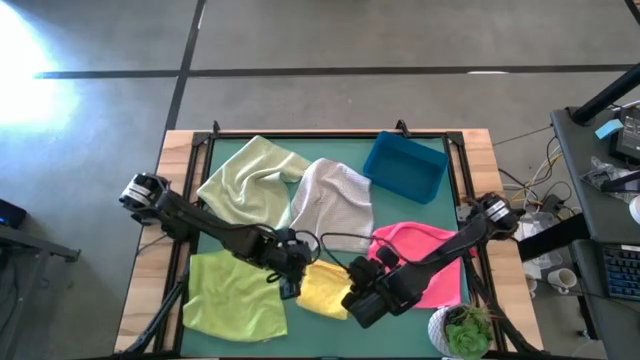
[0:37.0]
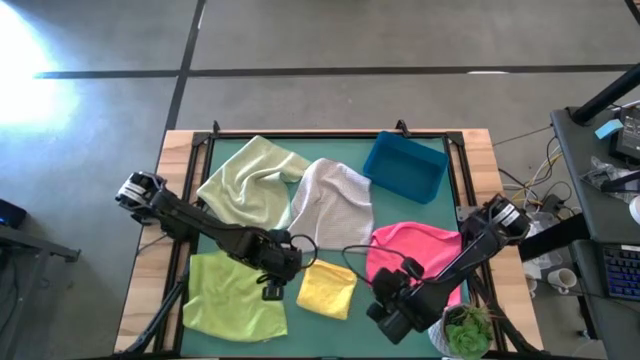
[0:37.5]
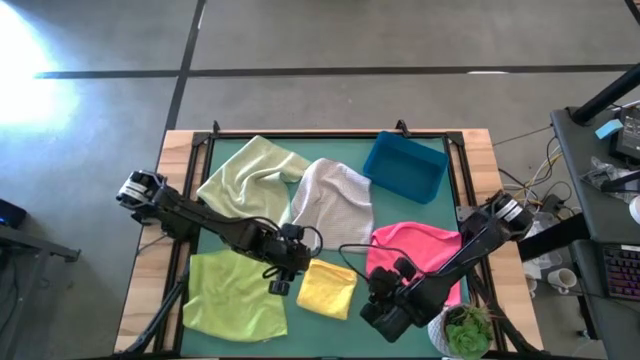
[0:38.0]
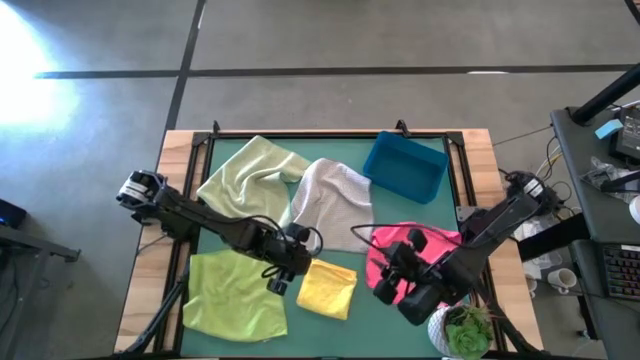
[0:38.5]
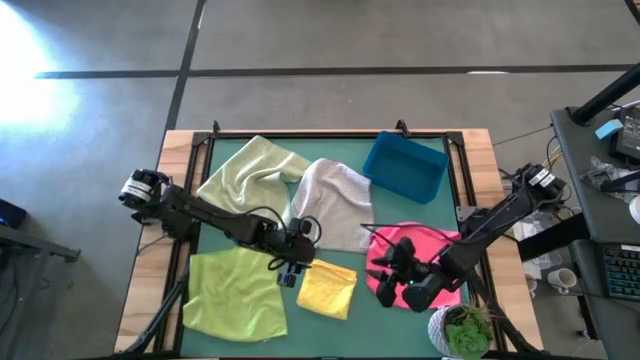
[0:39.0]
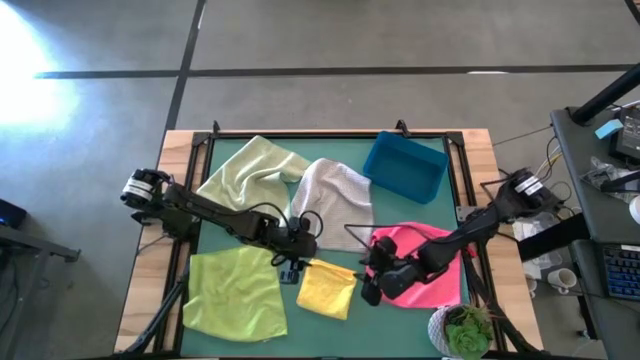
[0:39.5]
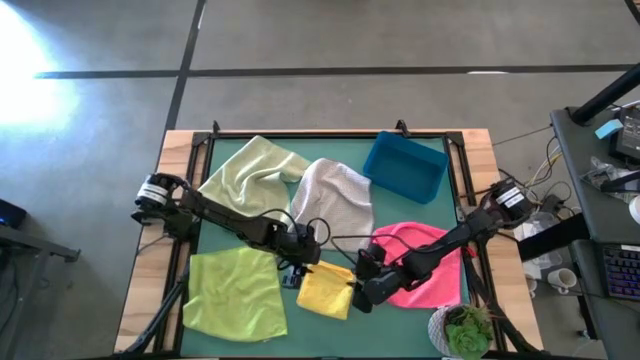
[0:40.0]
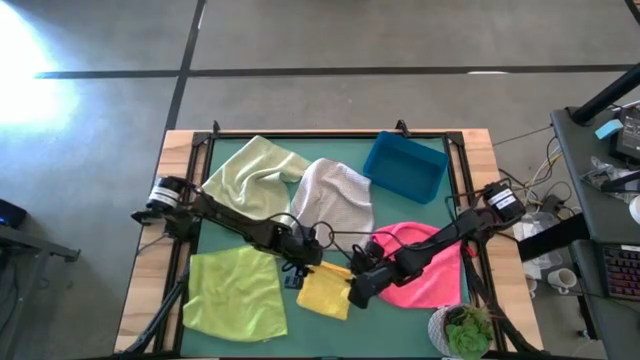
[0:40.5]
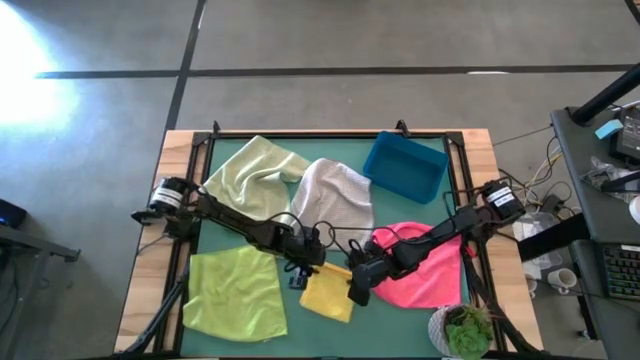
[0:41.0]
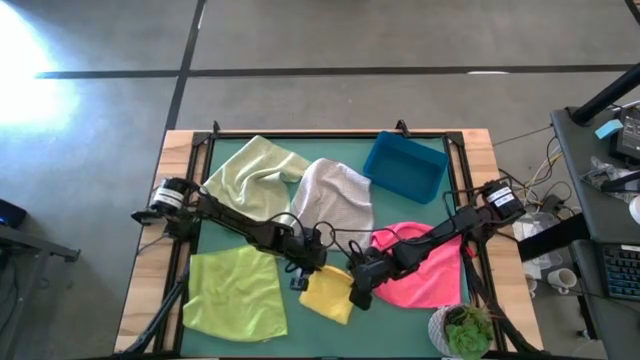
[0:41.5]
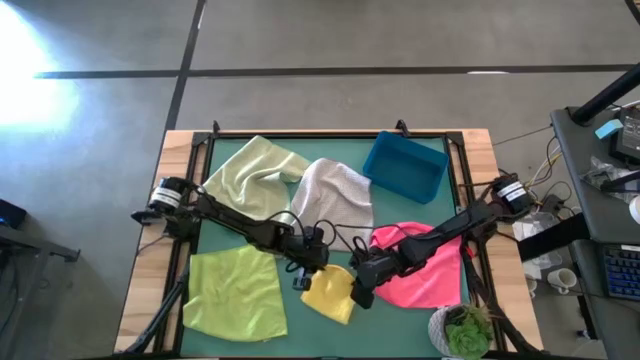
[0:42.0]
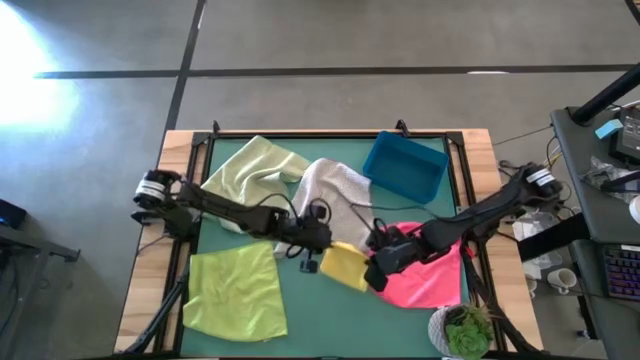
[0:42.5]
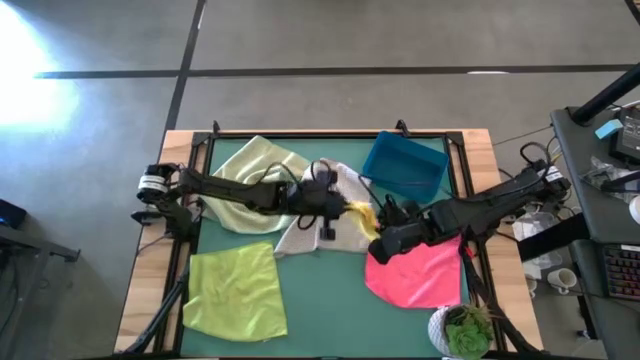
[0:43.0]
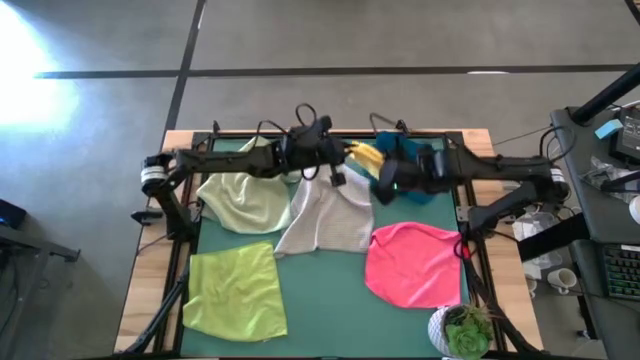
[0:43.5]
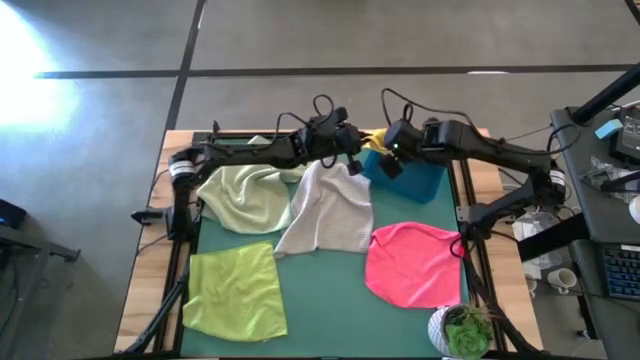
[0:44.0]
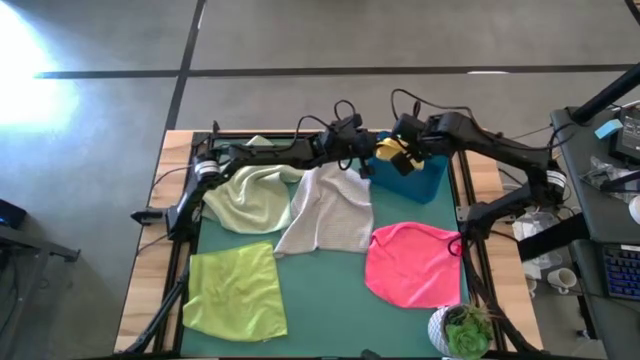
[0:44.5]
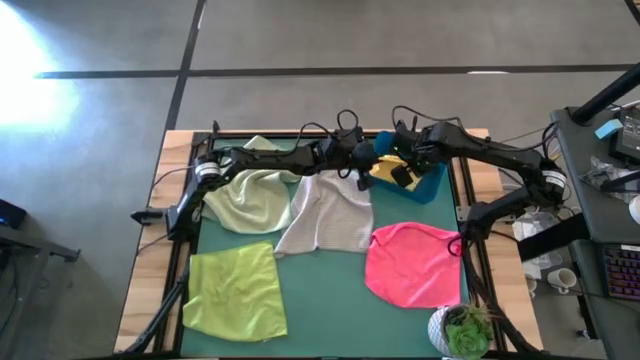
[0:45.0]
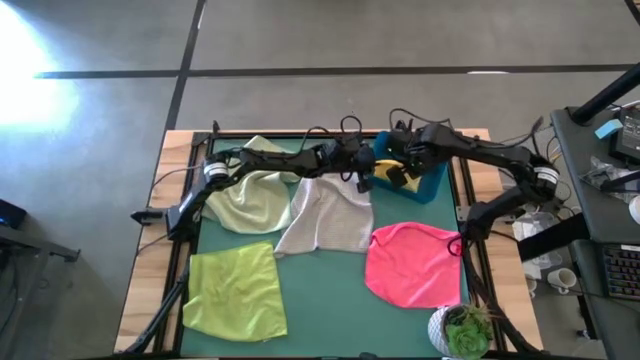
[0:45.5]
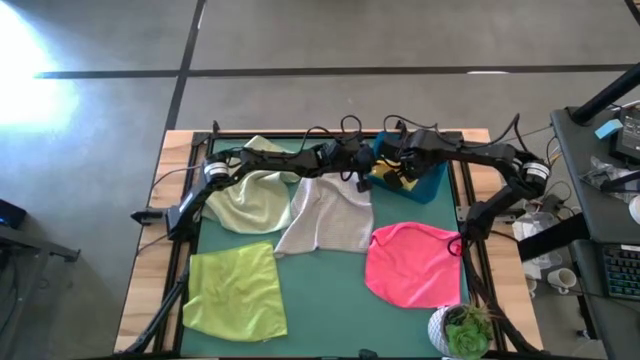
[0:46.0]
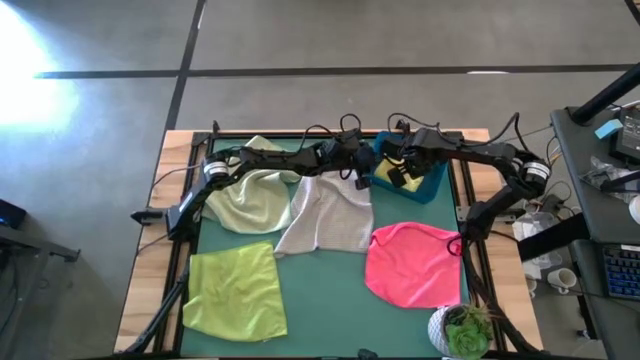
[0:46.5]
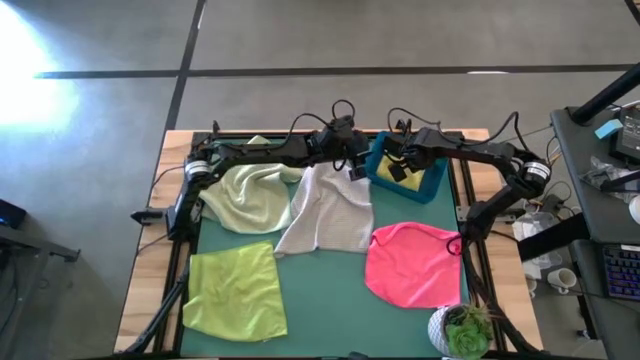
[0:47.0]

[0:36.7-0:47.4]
Task: Fold microfiber towels
Put the folded yellow microfiber cloth into the blue bin

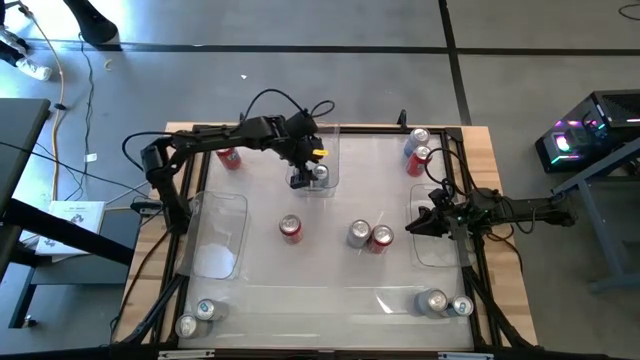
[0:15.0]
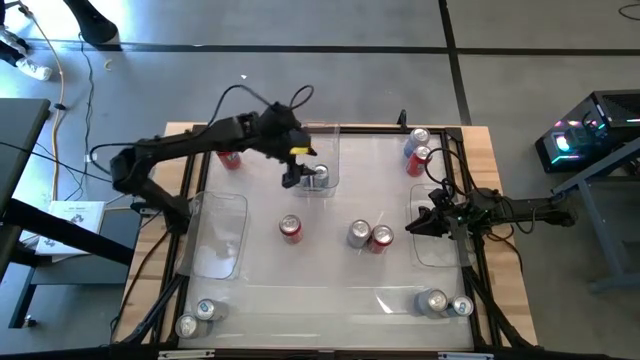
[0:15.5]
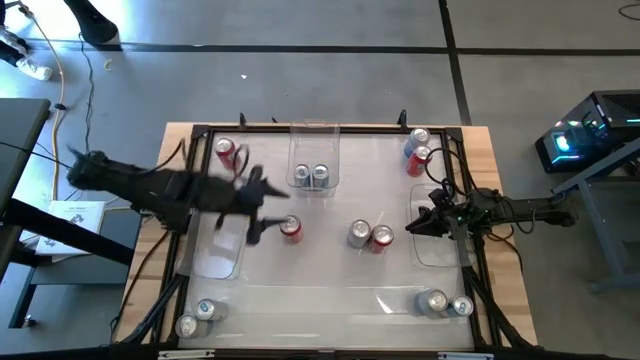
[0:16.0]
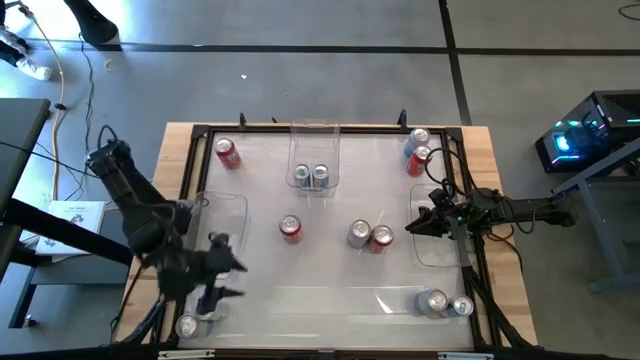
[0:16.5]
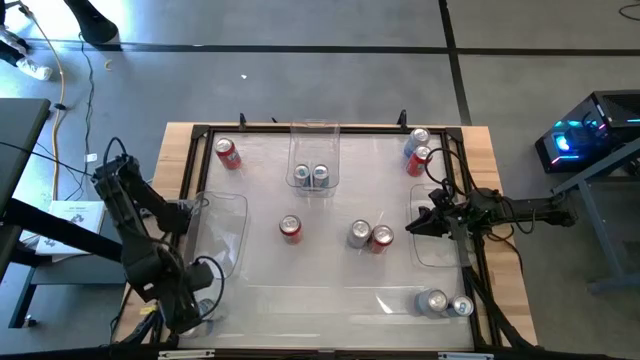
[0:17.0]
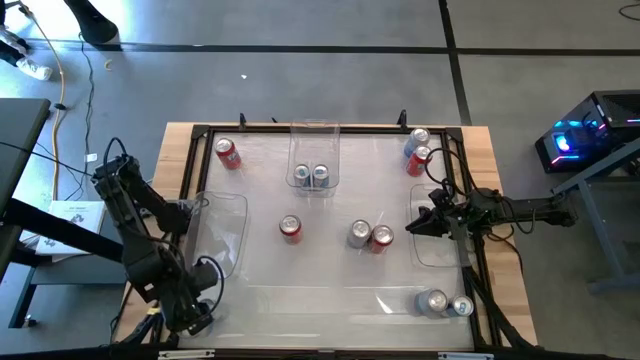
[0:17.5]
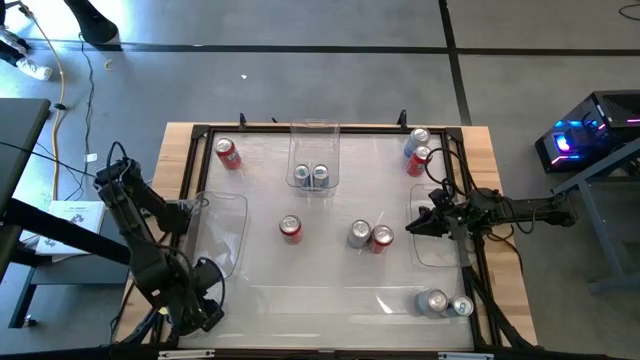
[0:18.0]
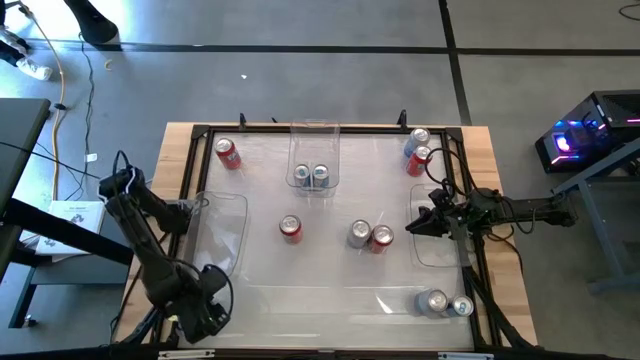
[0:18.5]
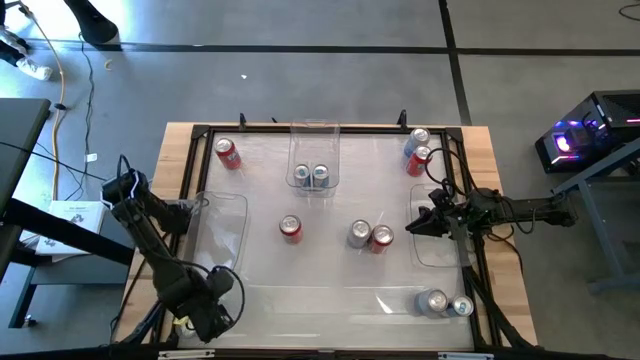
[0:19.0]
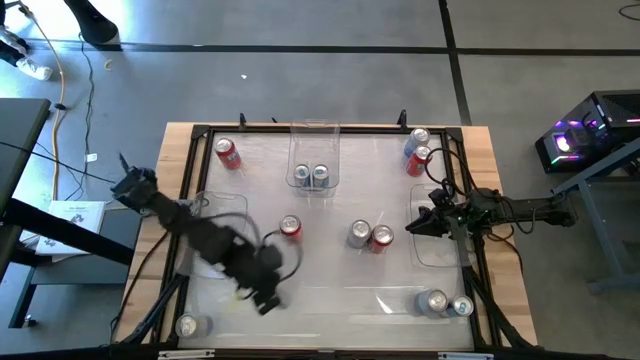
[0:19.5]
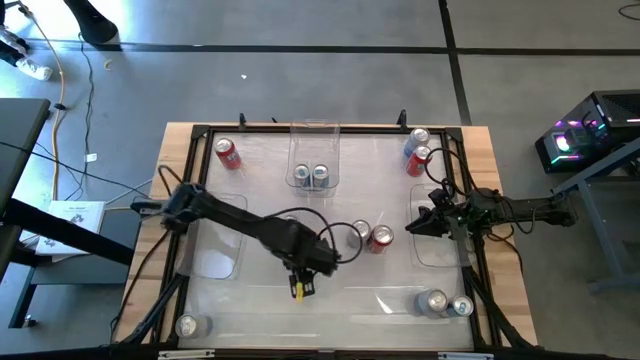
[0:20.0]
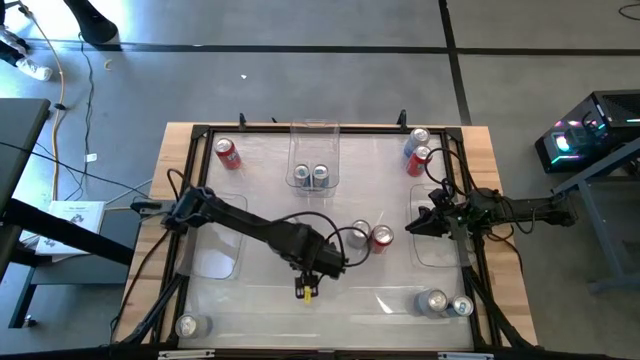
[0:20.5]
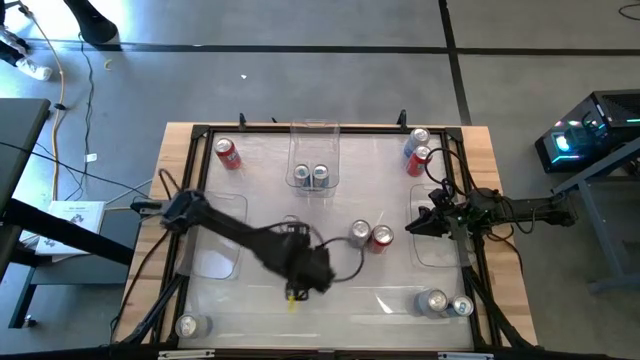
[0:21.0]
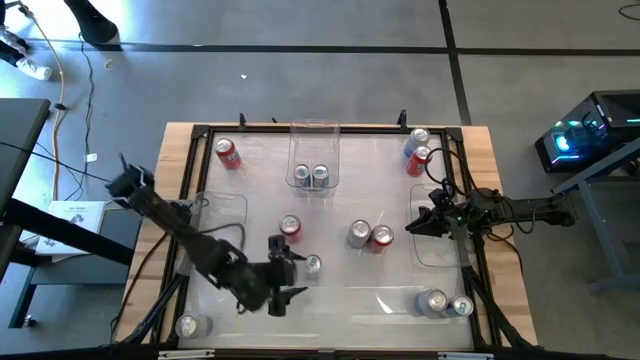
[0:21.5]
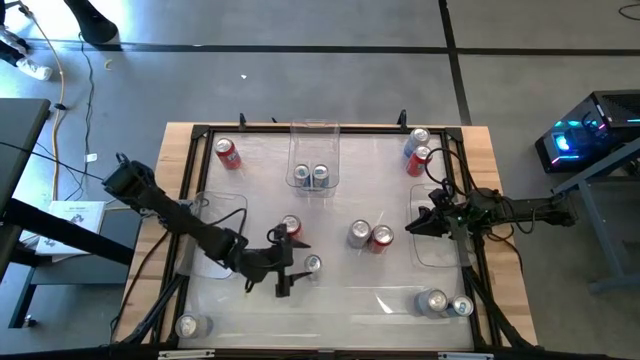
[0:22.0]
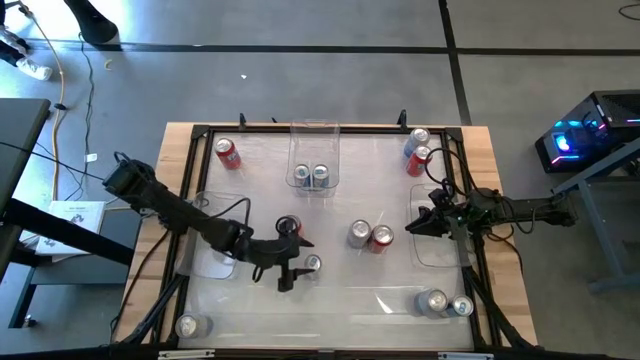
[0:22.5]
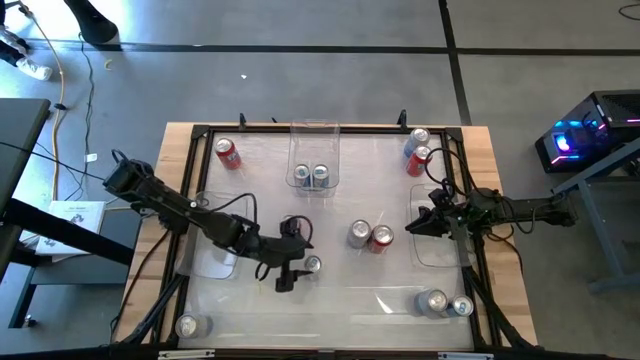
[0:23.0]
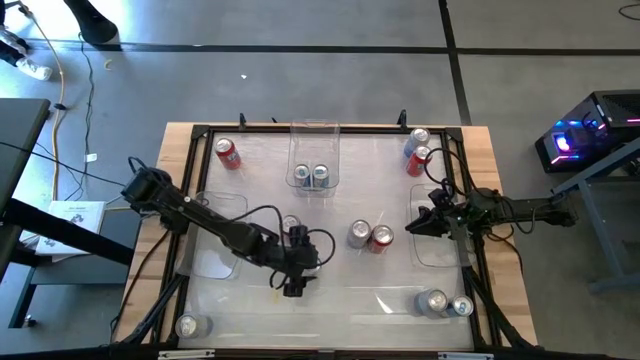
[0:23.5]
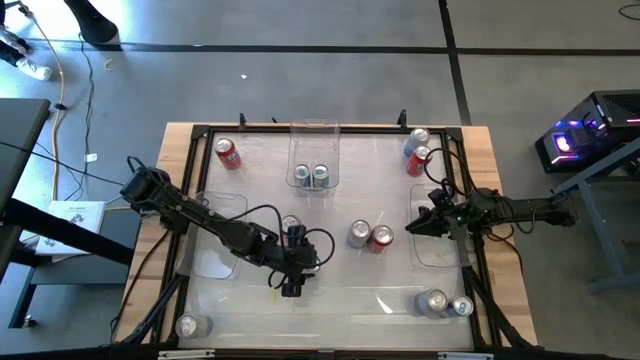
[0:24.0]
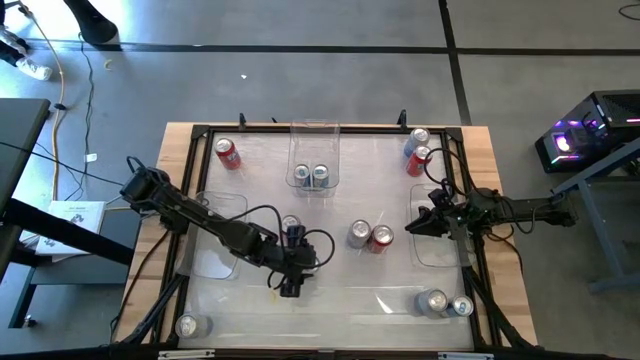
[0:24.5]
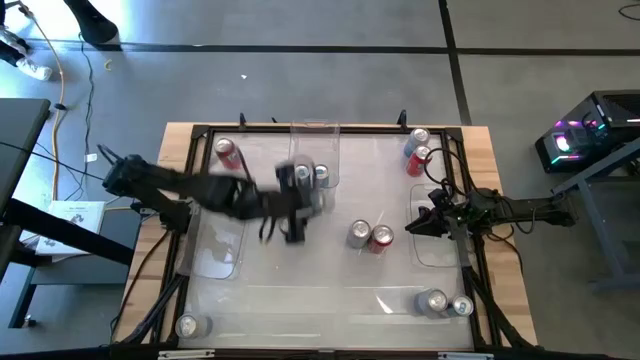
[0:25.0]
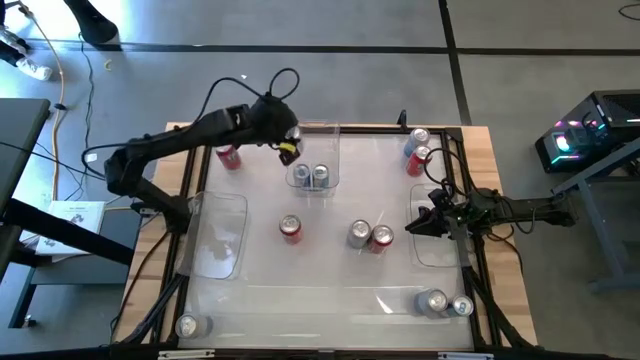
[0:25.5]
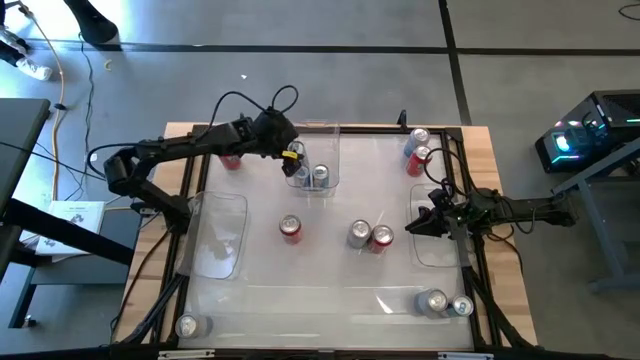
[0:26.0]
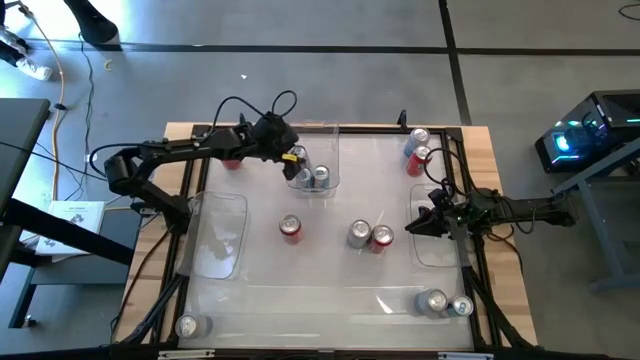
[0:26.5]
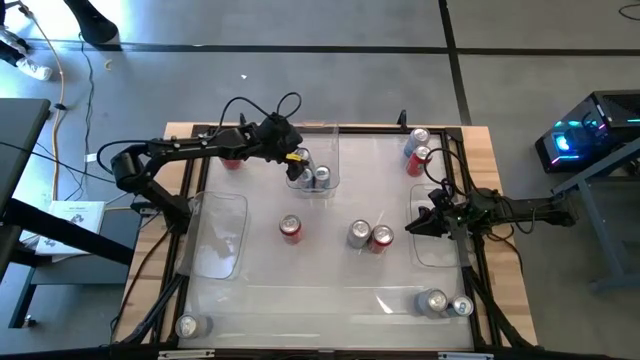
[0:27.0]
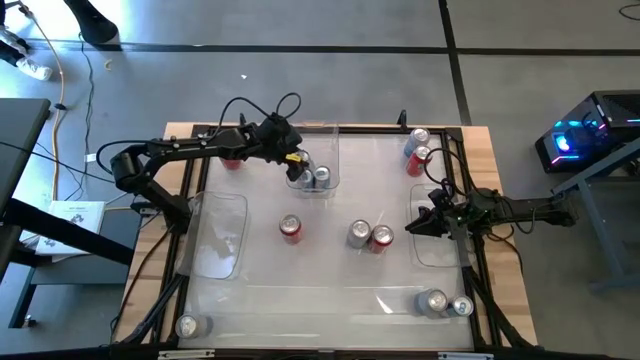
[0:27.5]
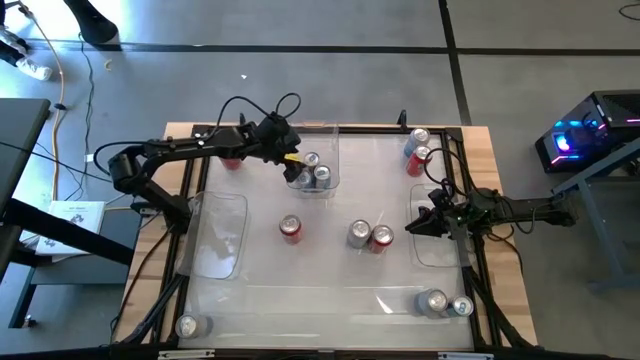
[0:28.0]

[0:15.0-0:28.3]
Task: Sort soda cans
Put the left blue soda can into the top center transparent bin
